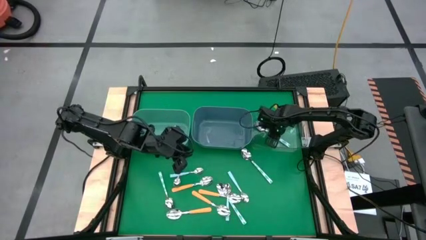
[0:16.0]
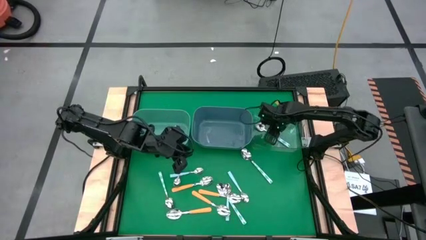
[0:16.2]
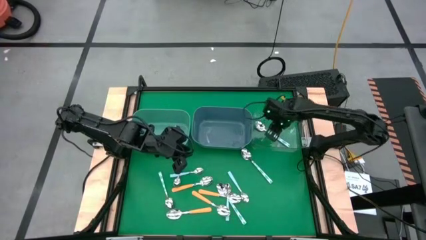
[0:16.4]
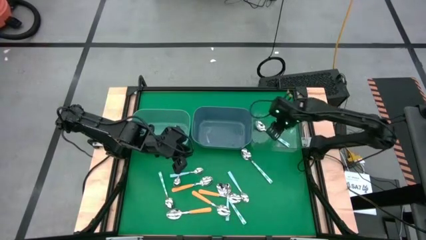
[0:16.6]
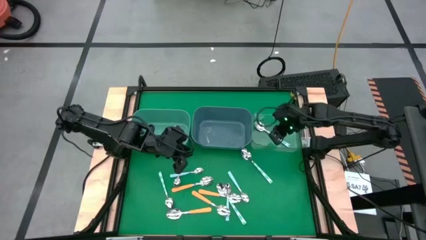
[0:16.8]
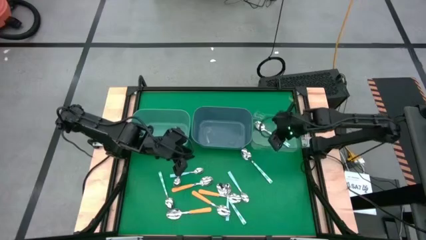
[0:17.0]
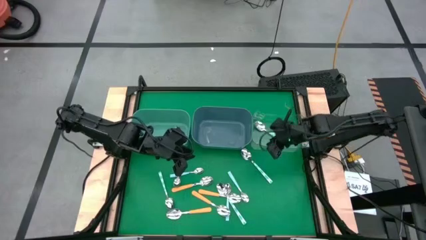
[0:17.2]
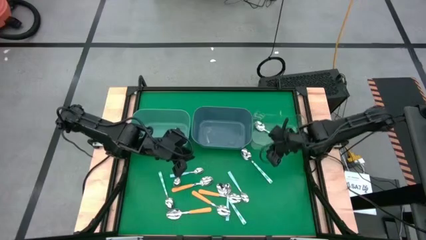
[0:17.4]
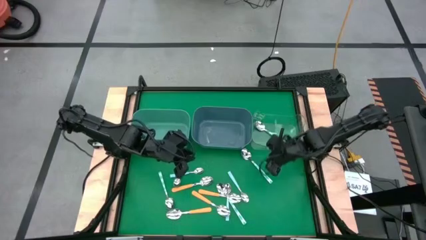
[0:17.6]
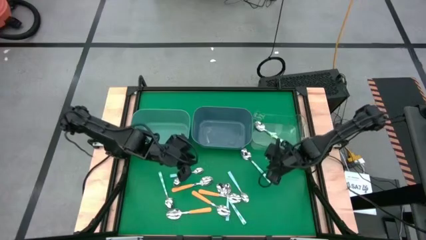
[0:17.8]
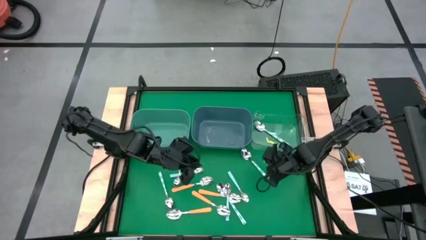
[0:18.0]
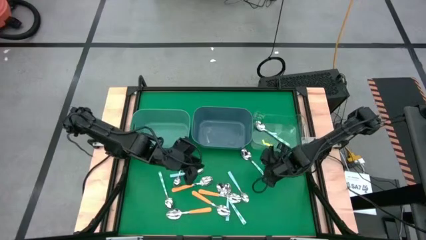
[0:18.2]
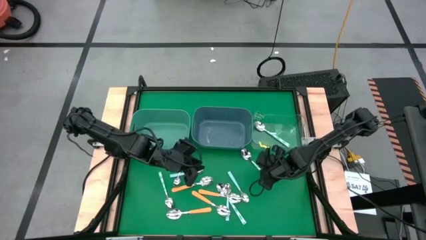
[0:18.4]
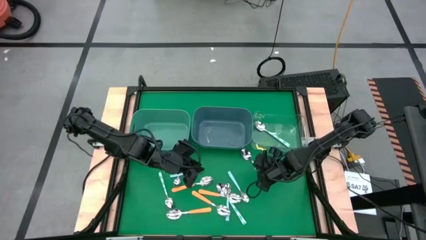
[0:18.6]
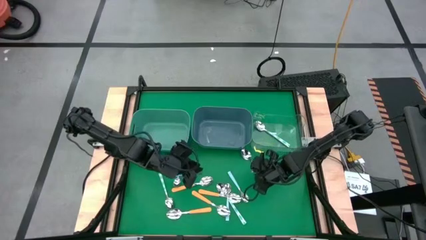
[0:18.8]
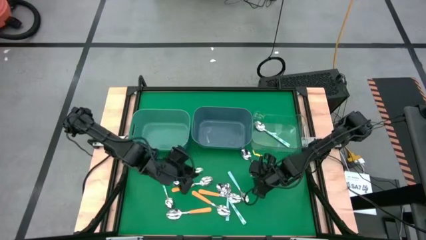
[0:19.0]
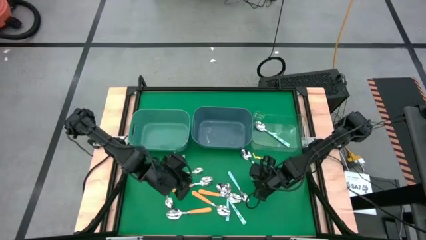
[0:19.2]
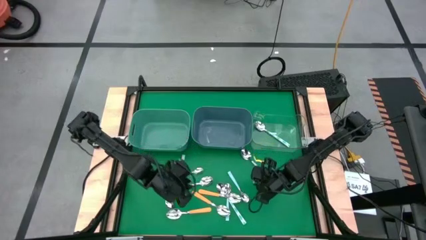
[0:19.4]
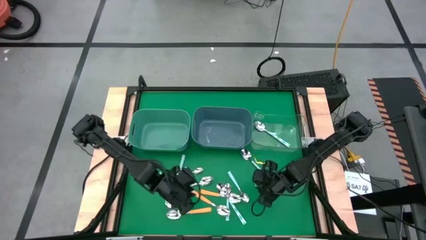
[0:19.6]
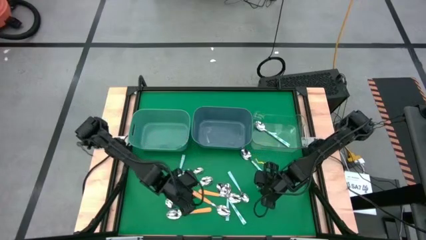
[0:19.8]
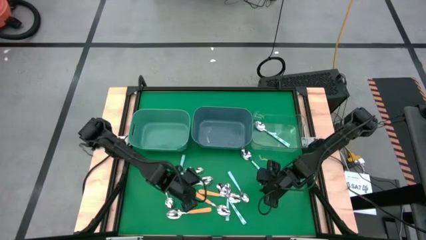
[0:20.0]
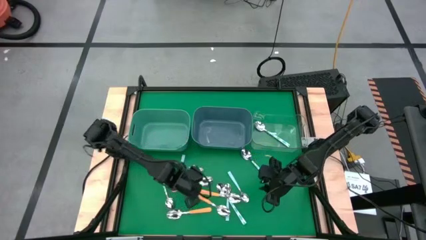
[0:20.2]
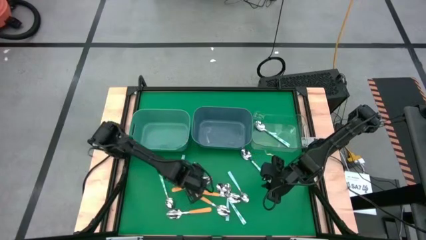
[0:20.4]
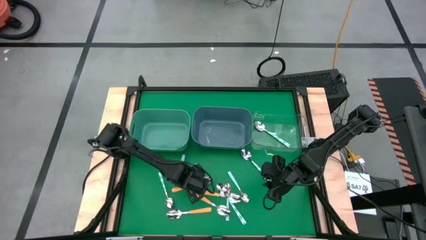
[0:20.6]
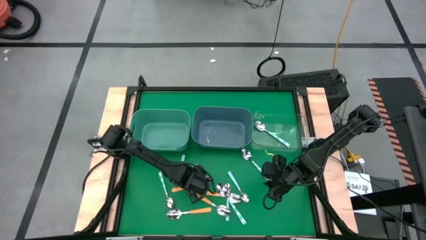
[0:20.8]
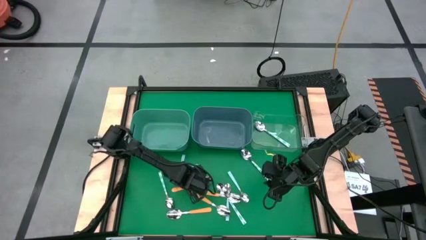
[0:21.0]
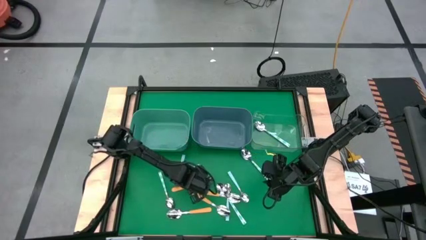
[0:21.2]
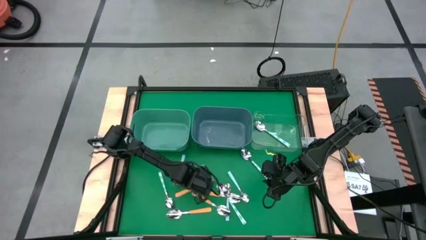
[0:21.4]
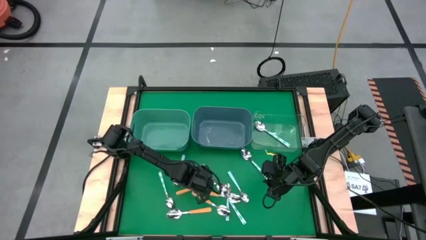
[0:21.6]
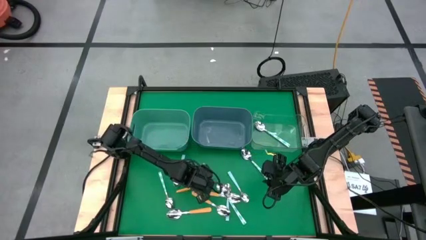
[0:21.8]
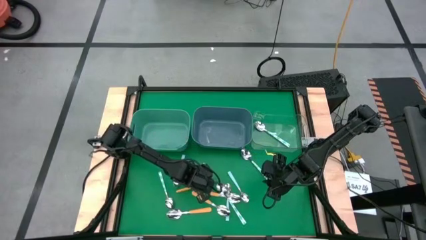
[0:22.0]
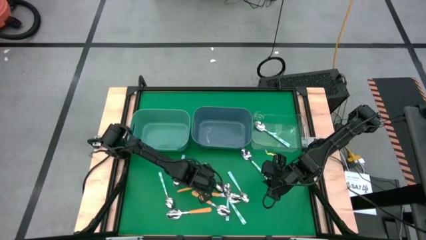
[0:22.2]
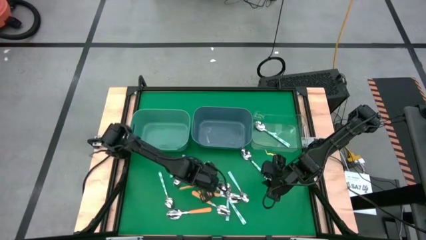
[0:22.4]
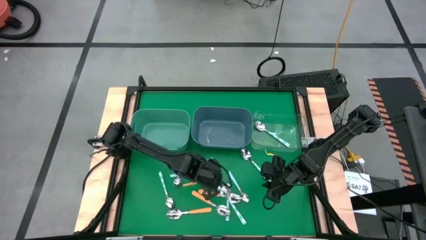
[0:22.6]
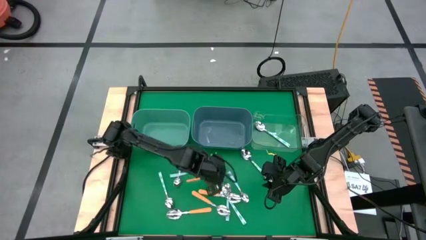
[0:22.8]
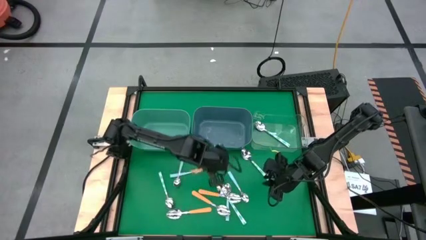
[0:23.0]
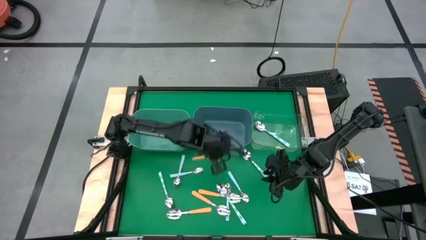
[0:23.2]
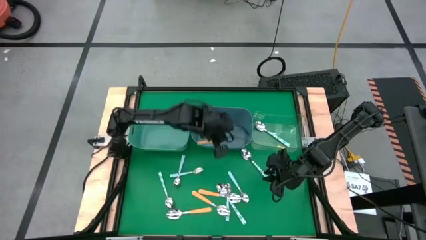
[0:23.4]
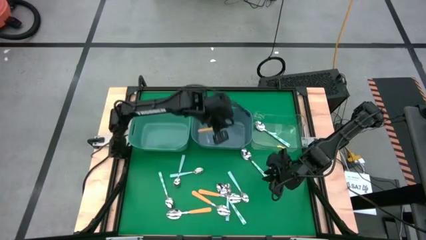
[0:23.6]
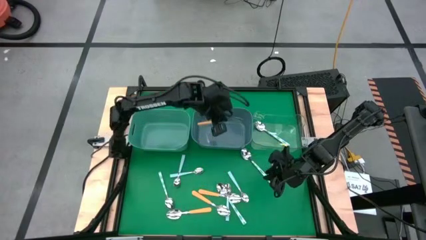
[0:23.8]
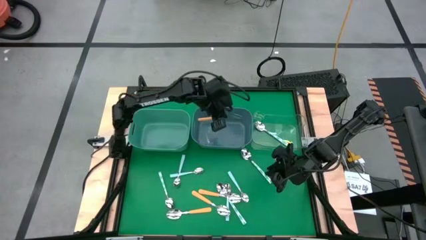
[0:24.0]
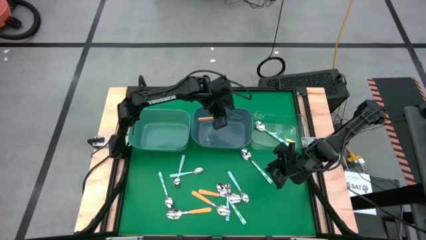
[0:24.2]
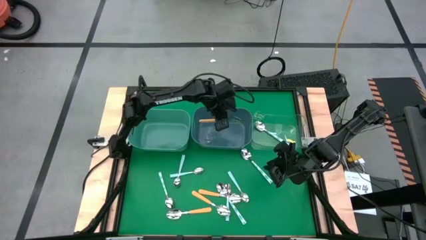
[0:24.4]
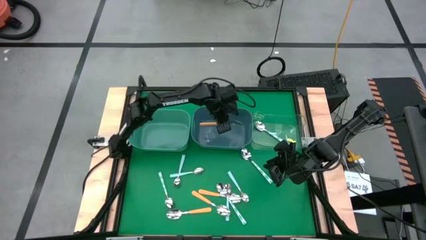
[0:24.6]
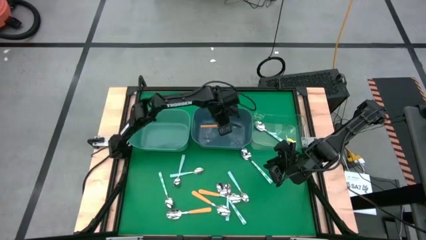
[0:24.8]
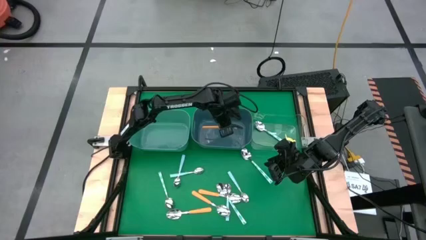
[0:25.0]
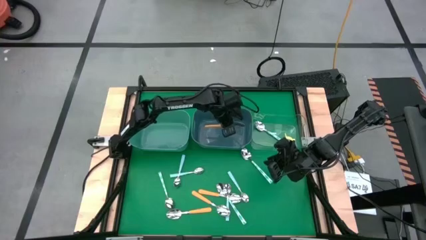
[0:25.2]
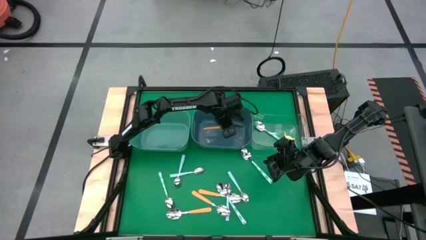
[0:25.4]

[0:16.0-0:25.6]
Task: Sort silverware by color (type)
Put the orange spoon into the blue bin

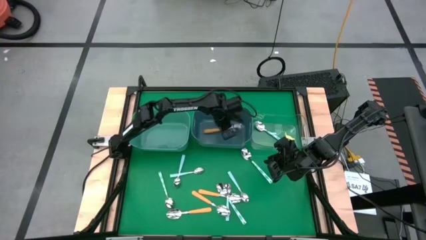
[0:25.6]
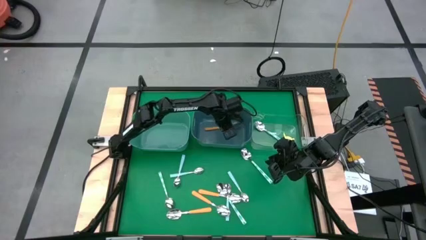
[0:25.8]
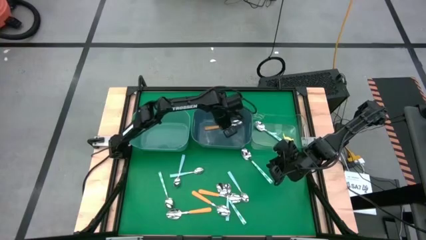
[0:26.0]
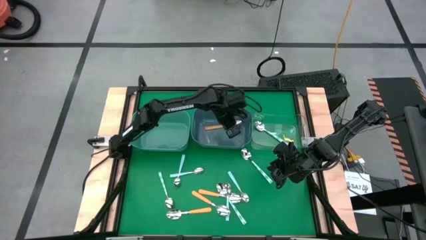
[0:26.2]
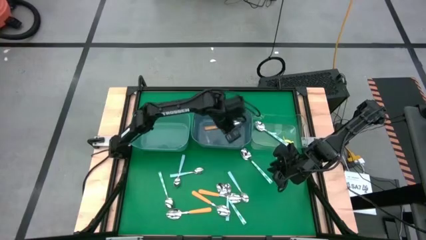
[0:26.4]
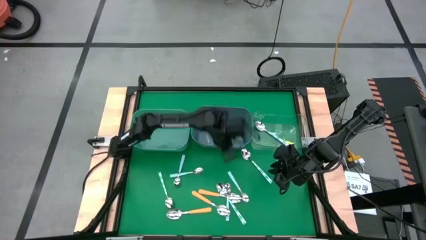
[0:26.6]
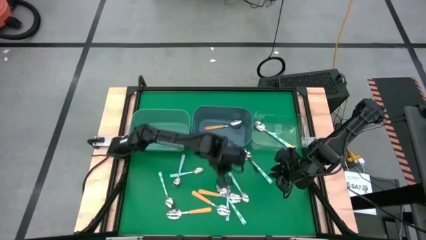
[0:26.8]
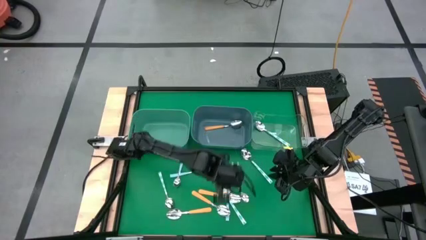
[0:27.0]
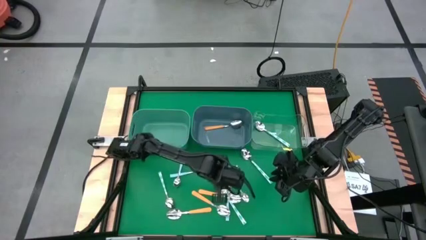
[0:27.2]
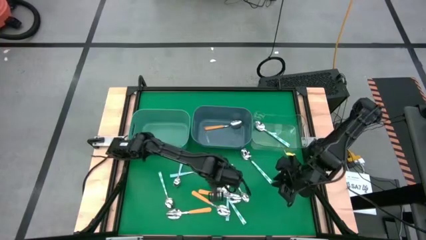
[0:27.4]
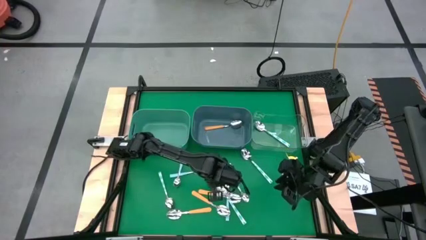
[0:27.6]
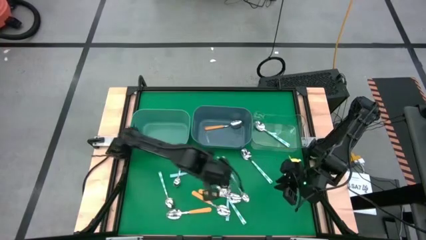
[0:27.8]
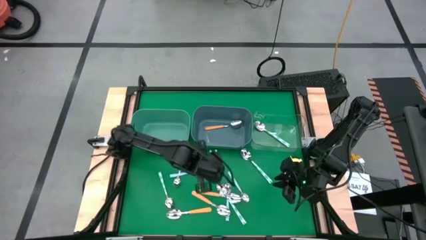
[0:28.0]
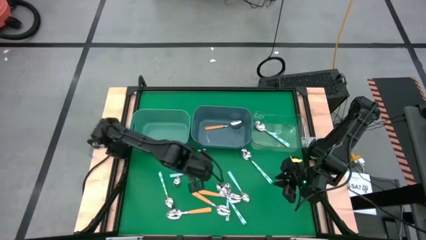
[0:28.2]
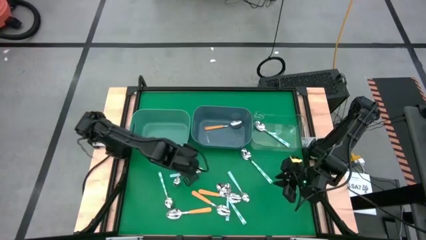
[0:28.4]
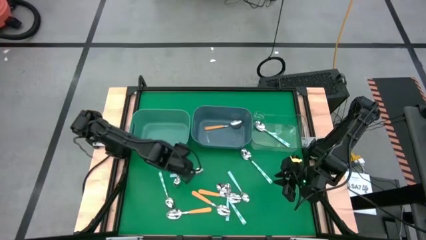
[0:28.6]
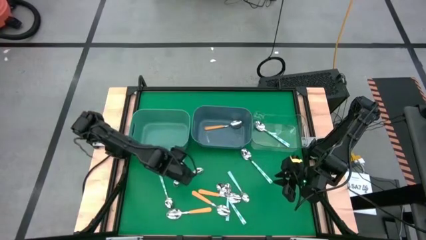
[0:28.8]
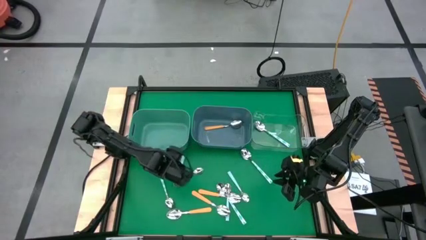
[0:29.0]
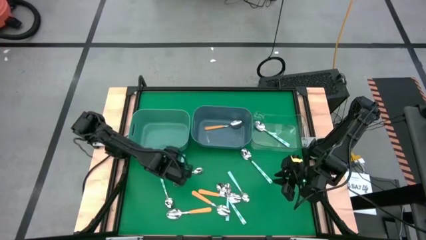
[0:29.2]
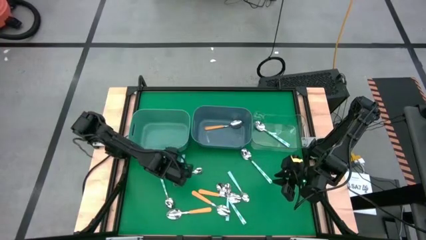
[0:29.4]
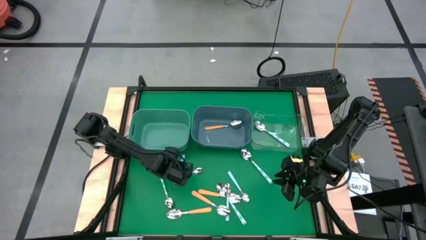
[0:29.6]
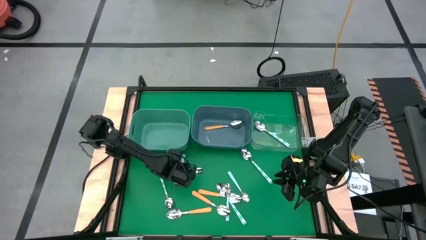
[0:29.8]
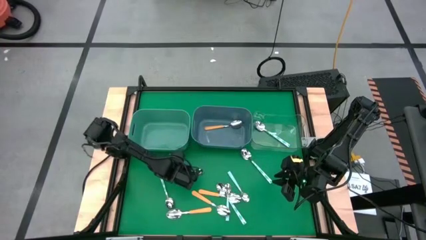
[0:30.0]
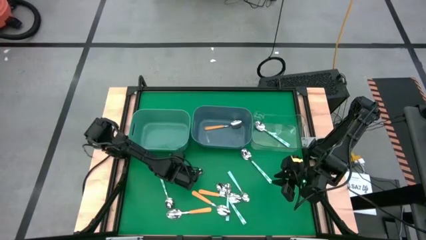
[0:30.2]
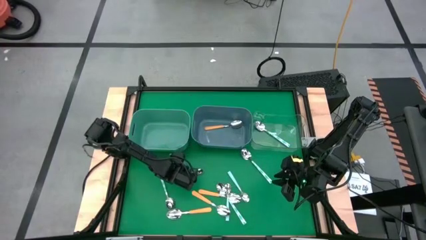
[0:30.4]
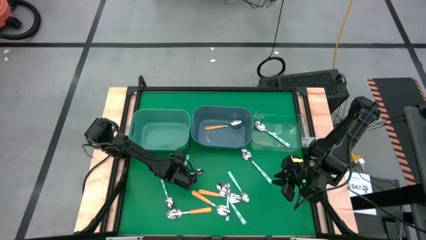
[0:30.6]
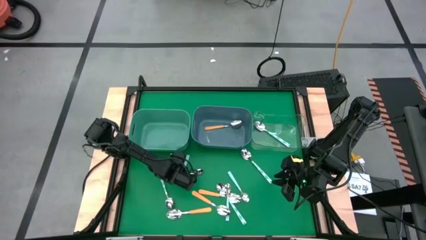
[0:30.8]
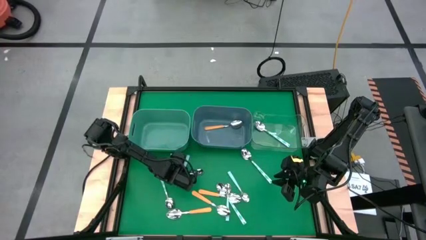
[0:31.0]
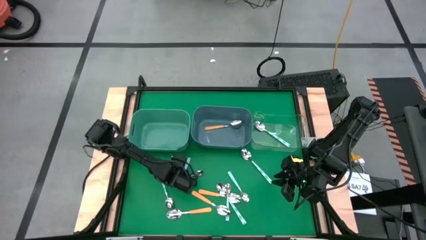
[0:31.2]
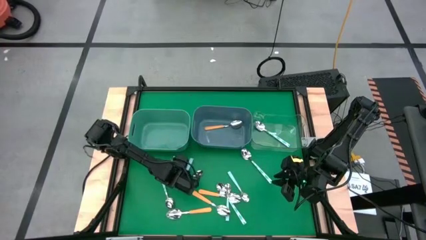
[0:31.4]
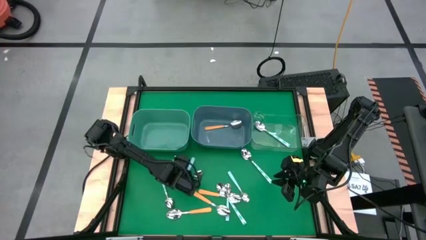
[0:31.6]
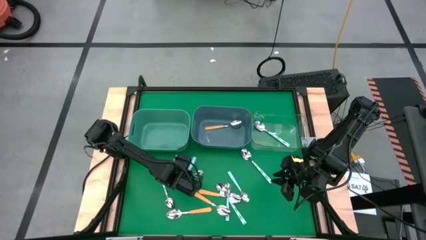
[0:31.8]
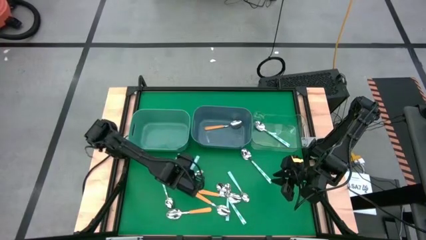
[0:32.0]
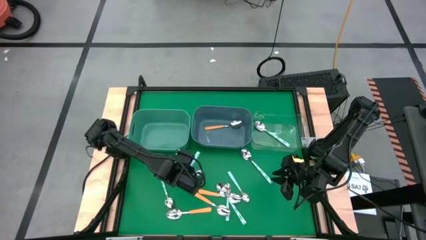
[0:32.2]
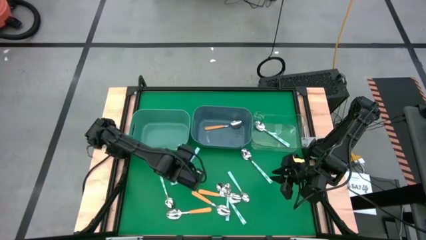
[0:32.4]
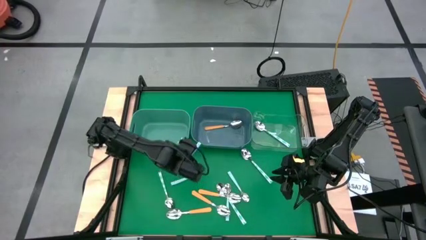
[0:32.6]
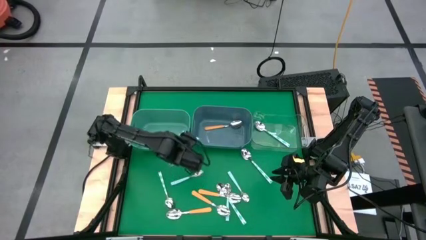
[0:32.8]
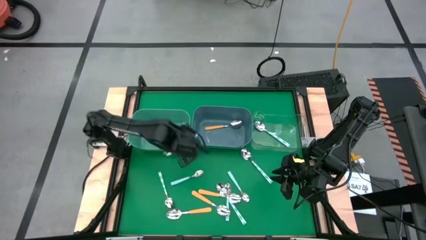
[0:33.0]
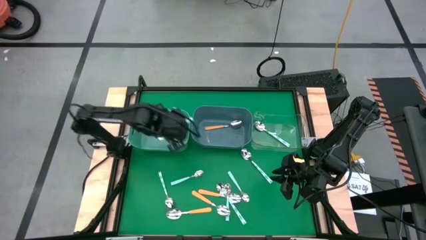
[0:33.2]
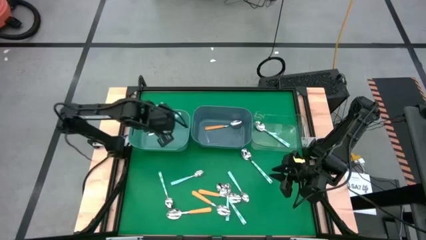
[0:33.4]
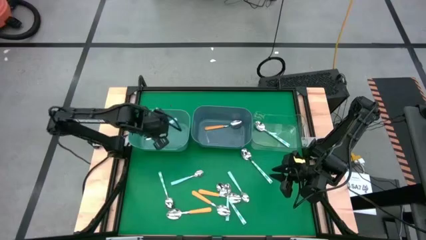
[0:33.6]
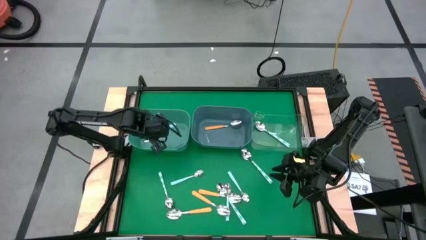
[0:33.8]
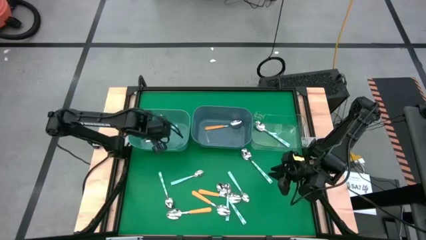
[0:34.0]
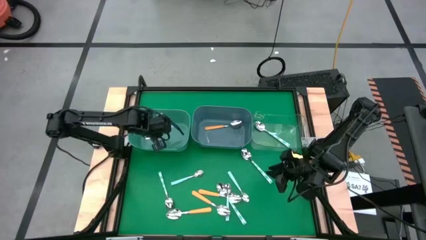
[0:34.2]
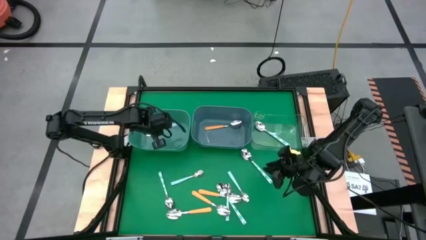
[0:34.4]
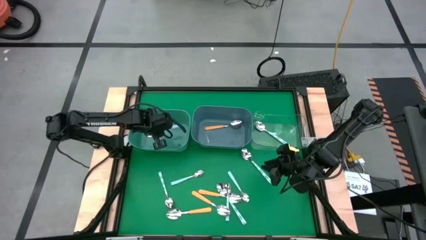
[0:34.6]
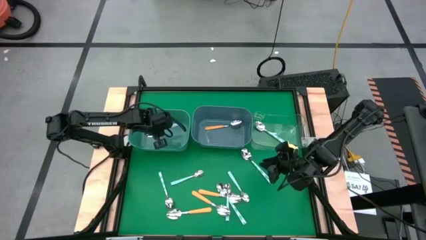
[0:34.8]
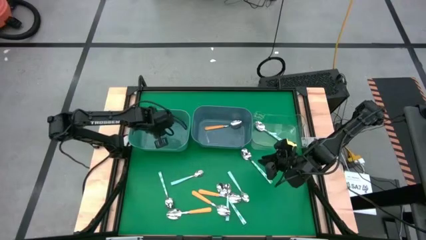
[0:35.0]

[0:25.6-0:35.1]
Put the blue spoon into the green bin
